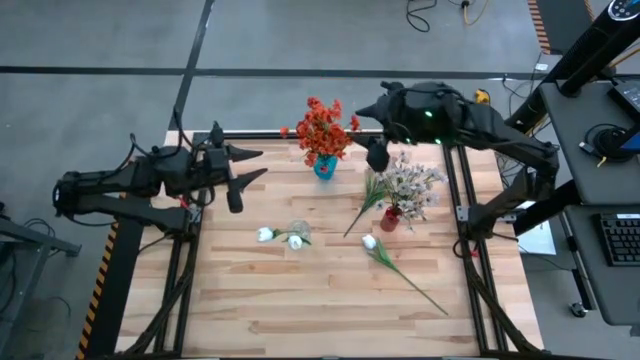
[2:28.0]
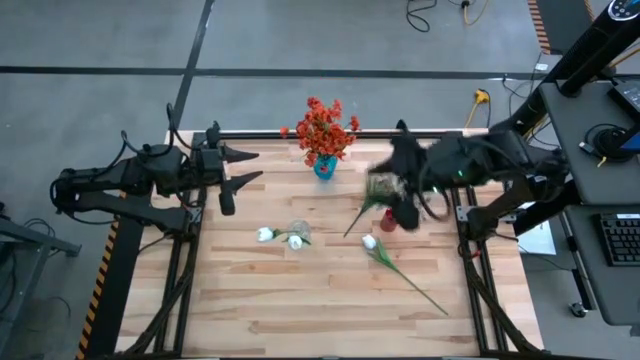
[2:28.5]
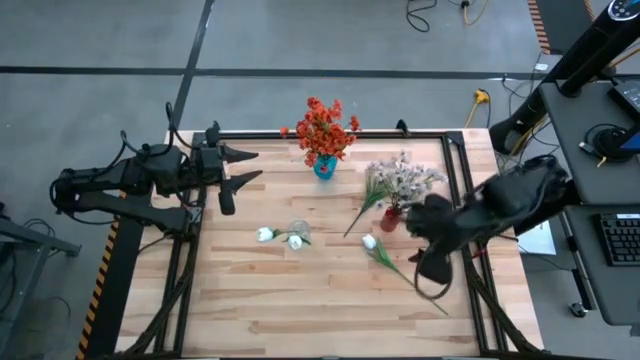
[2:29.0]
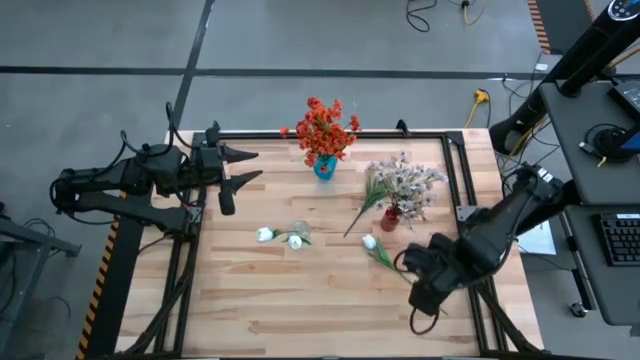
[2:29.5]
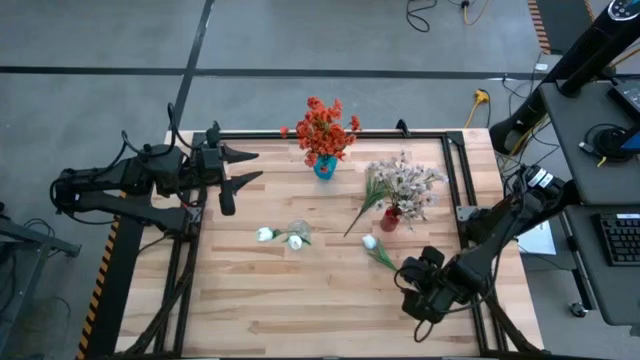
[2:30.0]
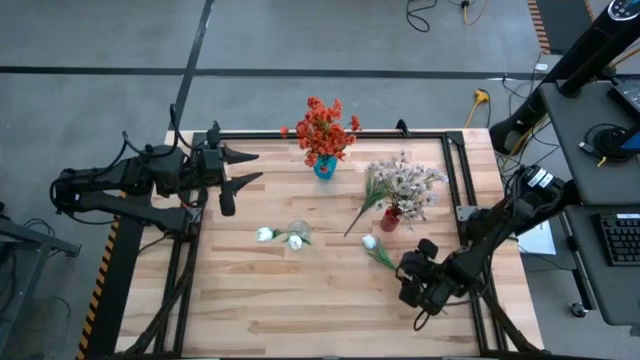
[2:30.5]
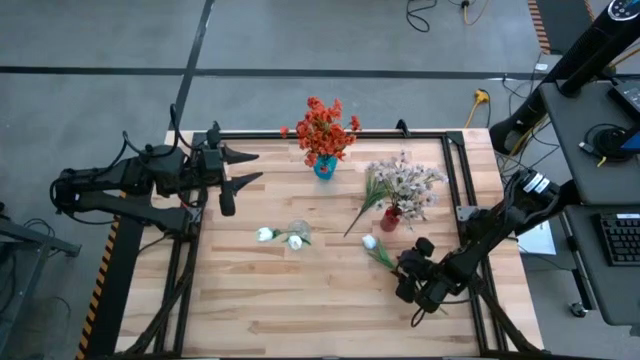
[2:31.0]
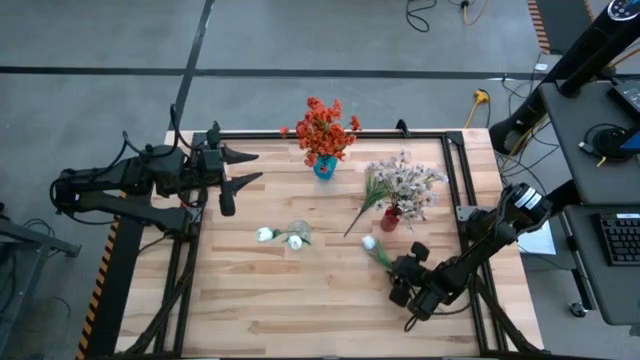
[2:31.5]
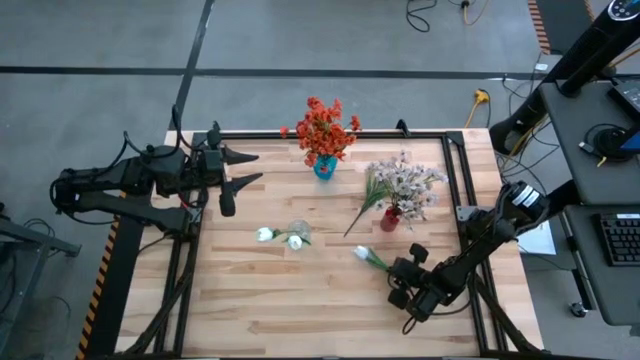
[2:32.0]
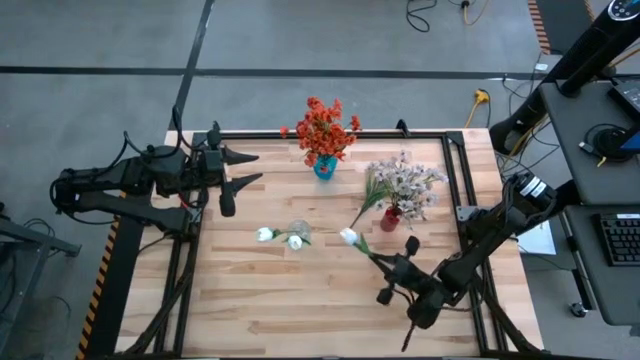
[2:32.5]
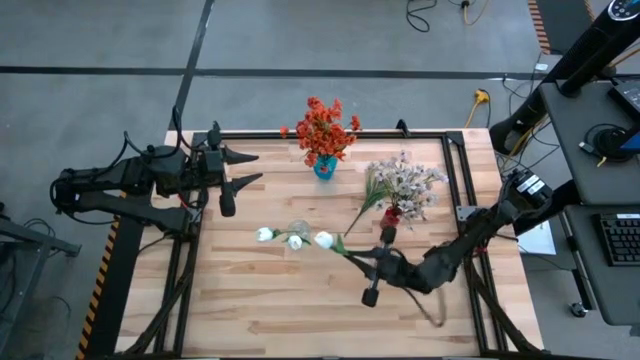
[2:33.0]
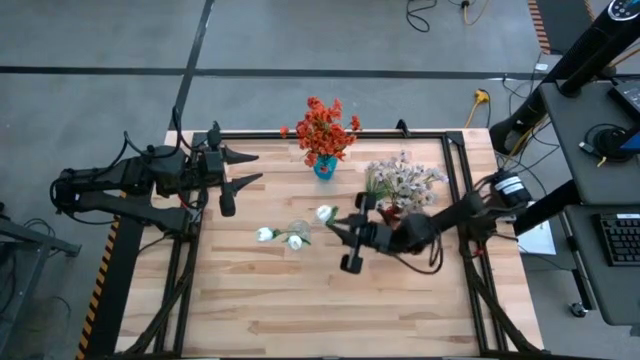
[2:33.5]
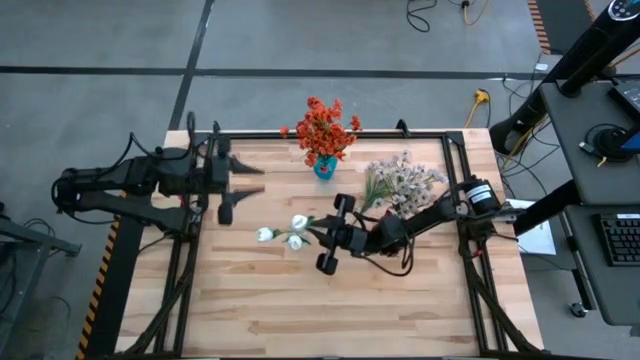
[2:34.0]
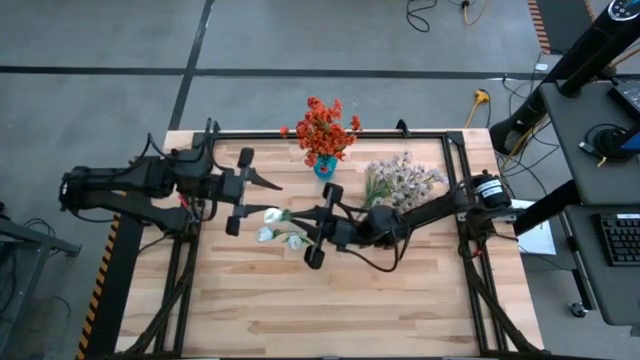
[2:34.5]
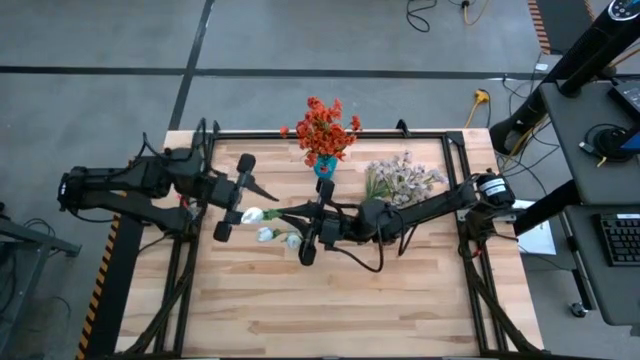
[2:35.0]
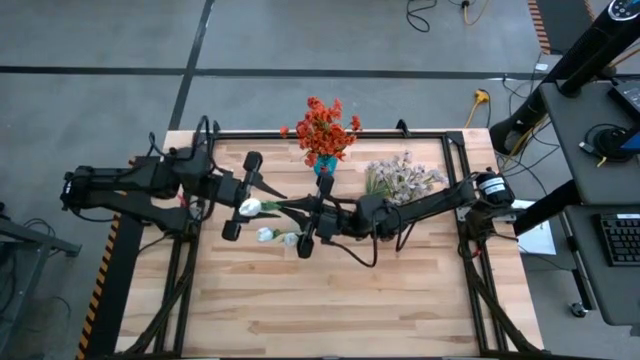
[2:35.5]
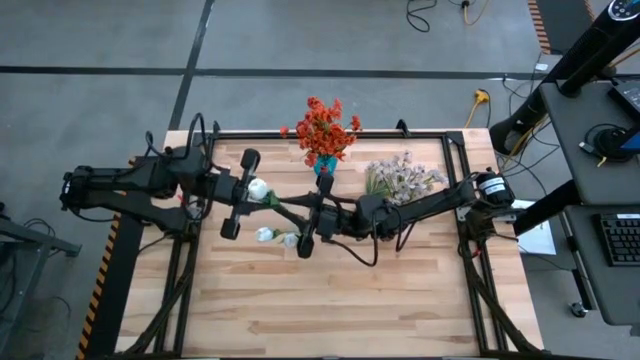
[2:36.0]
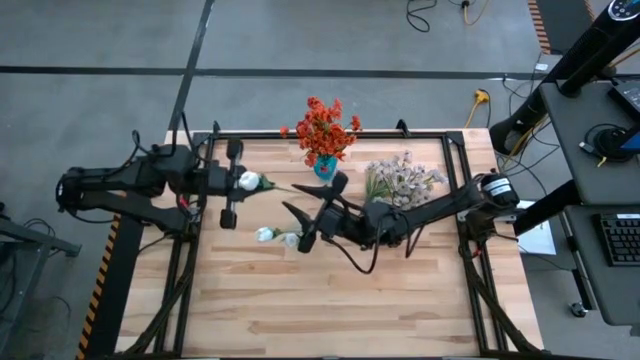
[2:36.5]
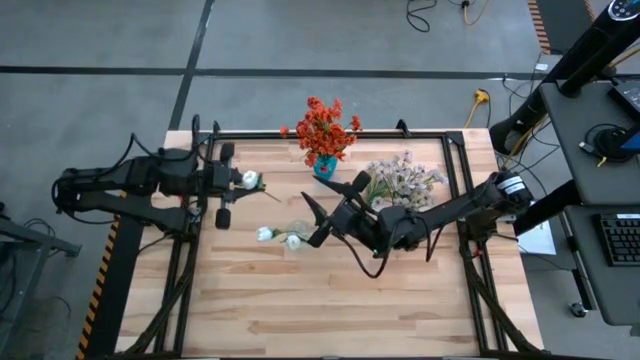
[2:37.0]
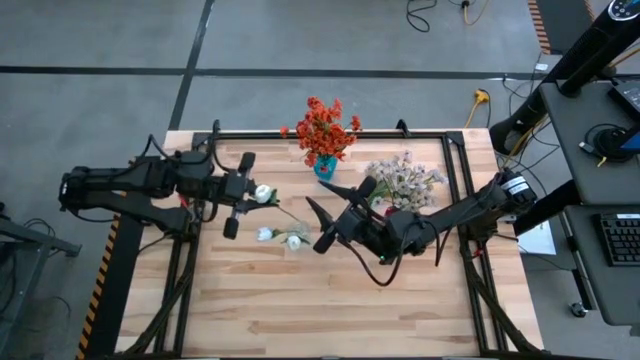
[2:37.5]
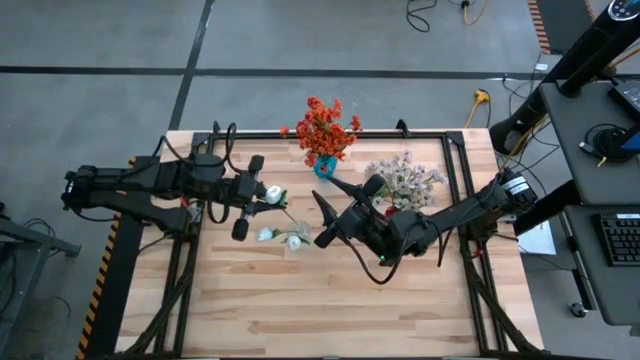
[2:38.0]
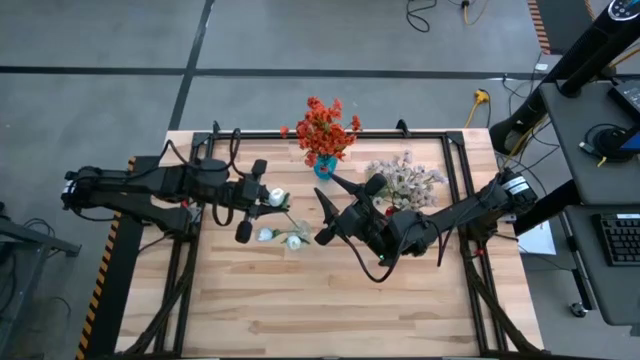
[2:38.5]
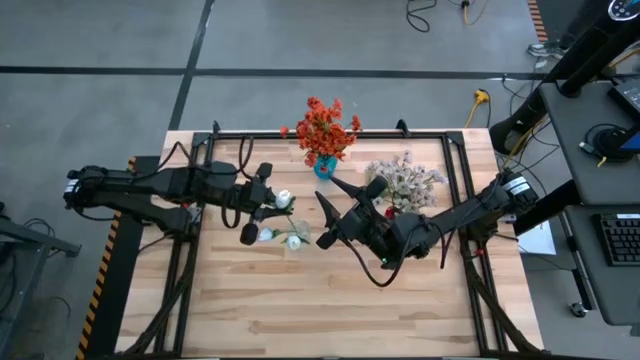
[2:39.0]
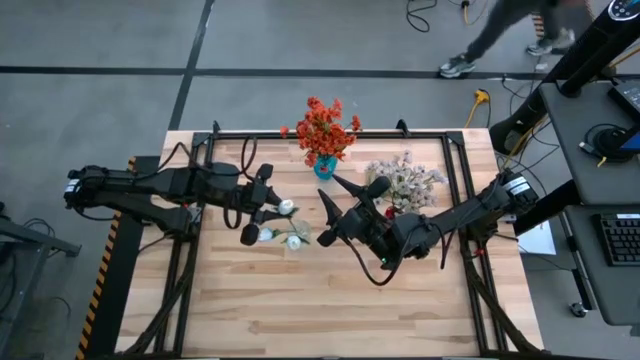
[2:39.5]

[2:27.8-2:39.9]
Task: Sort flowers into vase by color
Put the white flower into the transparent vase

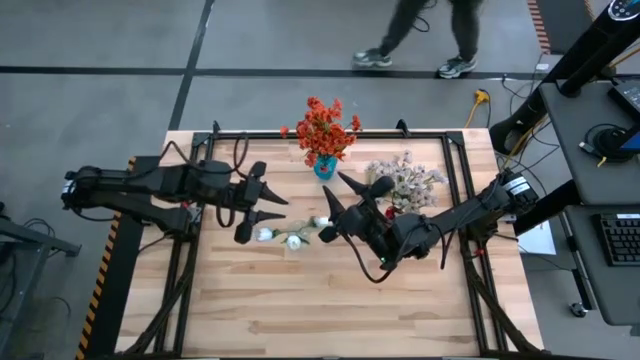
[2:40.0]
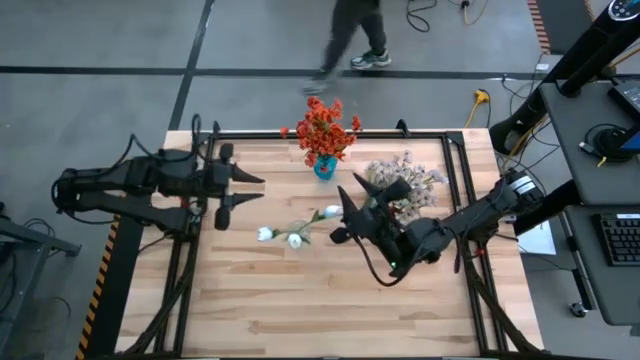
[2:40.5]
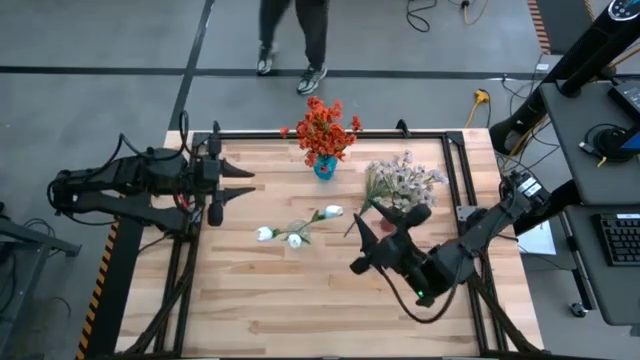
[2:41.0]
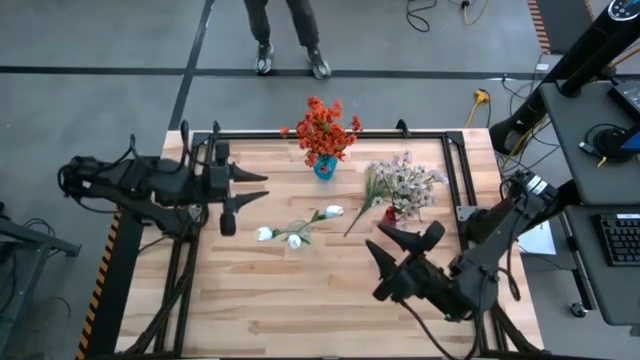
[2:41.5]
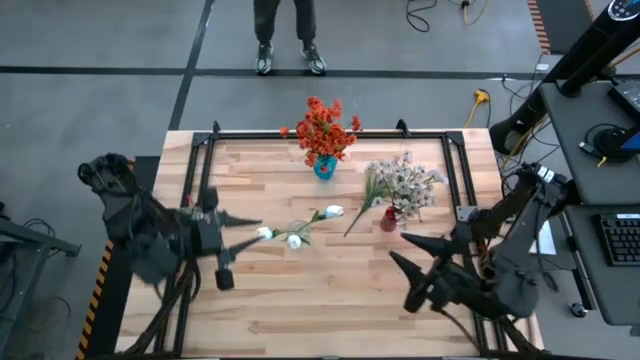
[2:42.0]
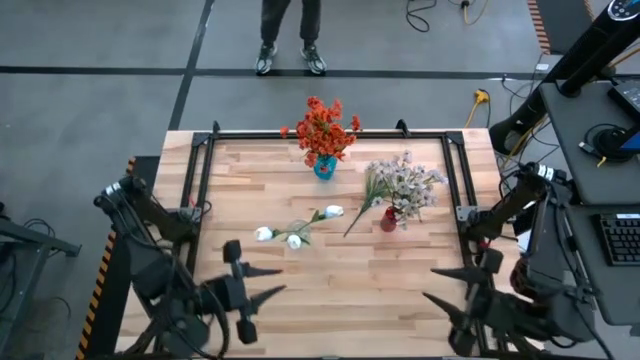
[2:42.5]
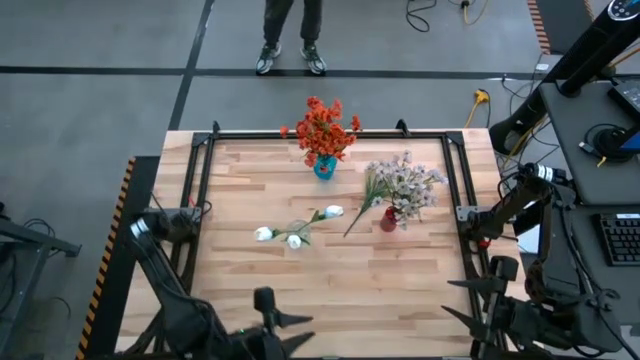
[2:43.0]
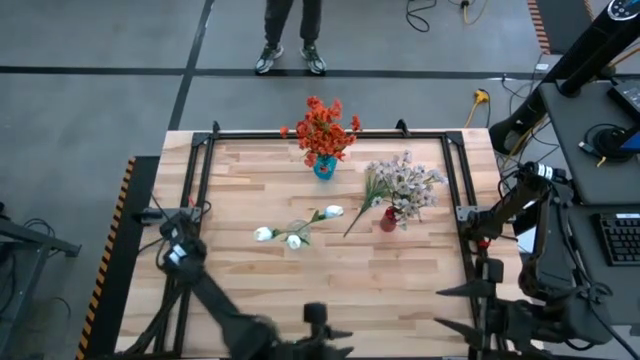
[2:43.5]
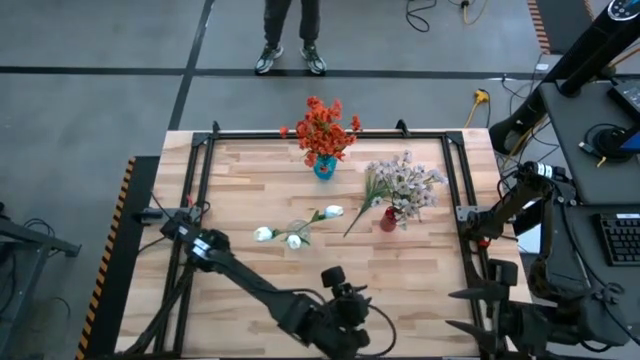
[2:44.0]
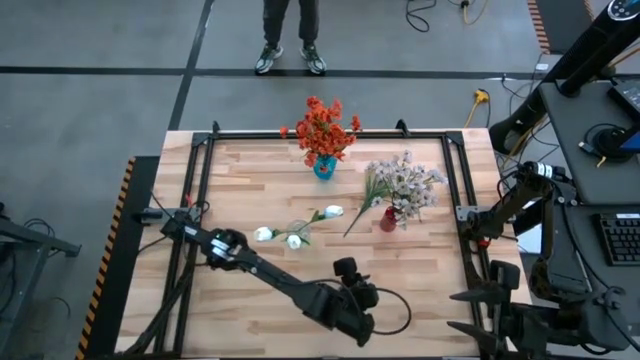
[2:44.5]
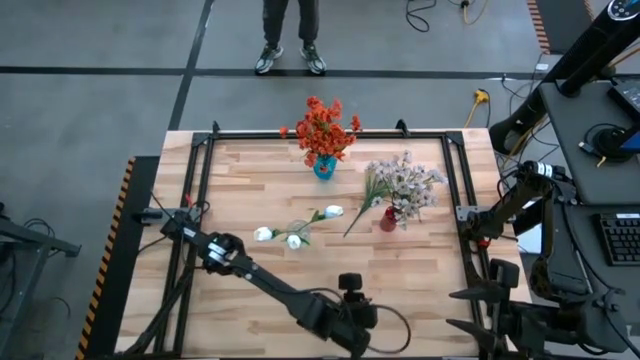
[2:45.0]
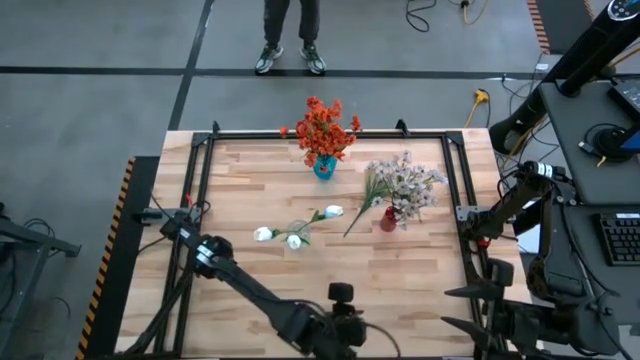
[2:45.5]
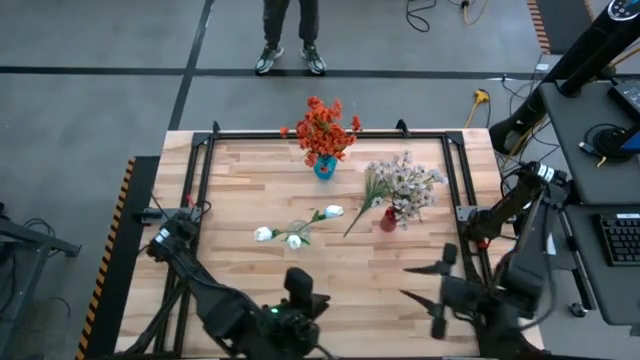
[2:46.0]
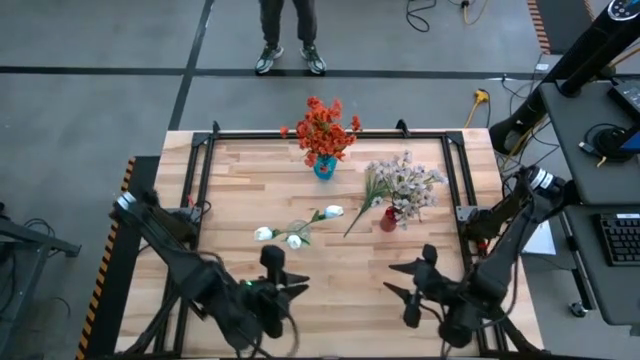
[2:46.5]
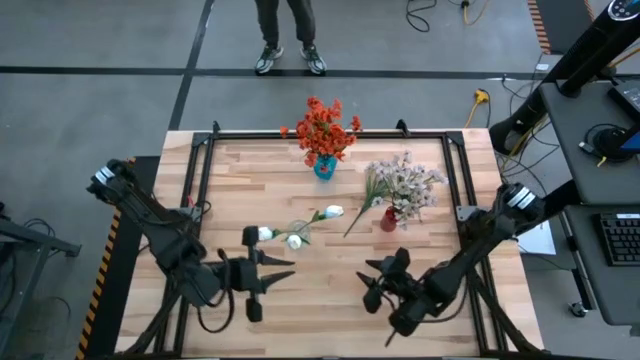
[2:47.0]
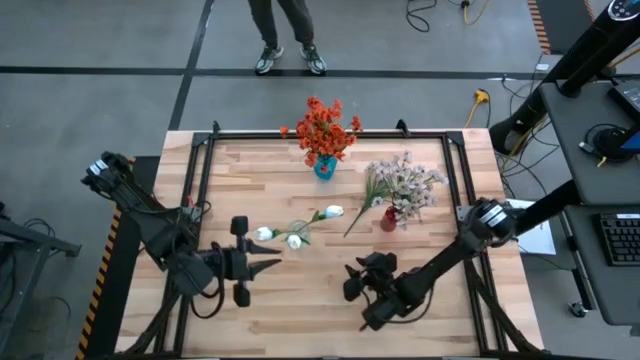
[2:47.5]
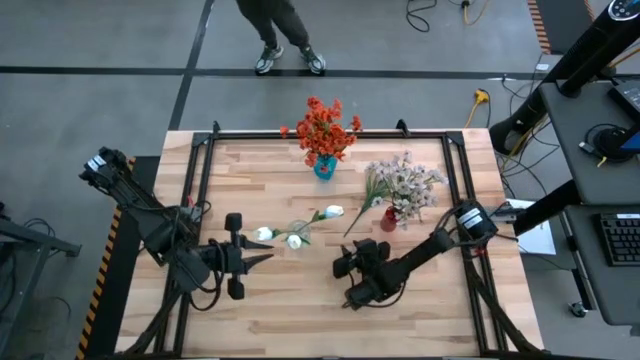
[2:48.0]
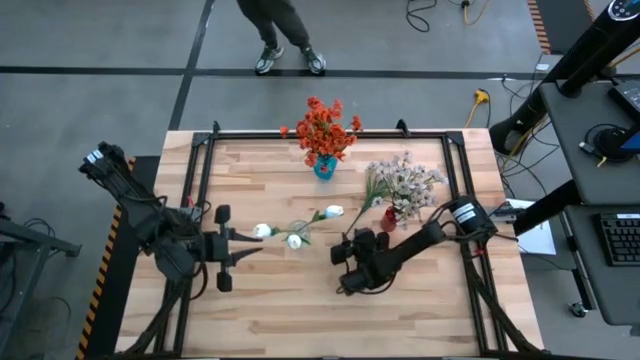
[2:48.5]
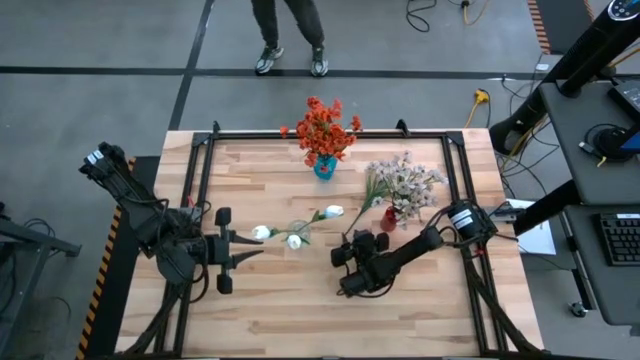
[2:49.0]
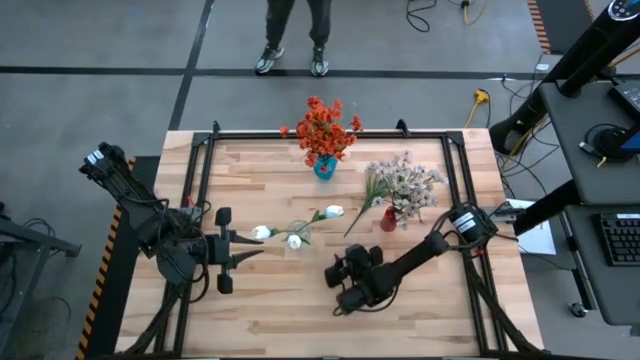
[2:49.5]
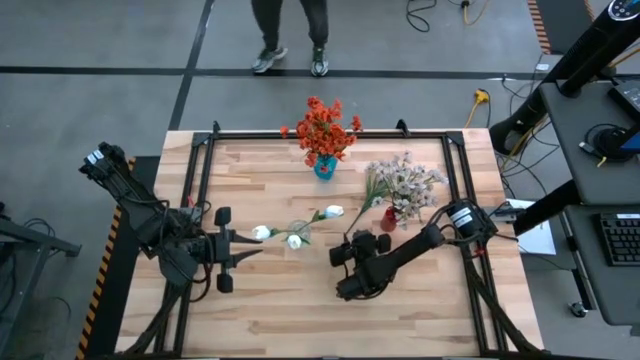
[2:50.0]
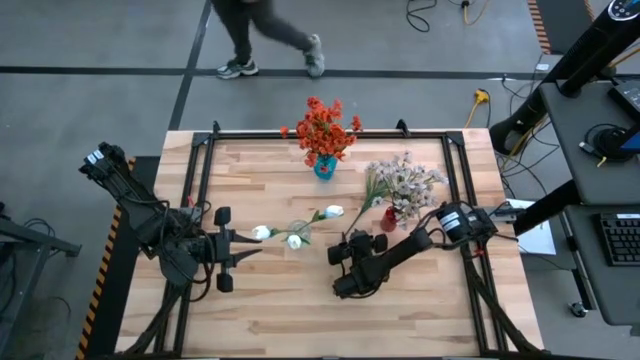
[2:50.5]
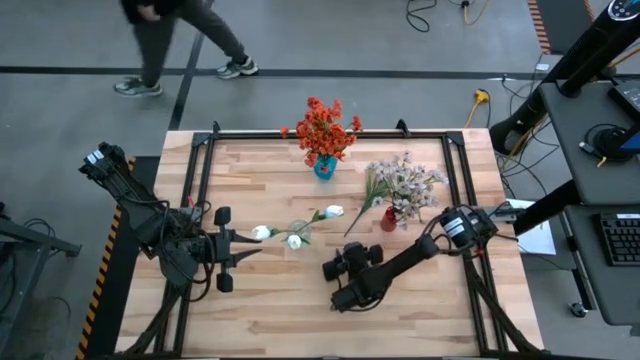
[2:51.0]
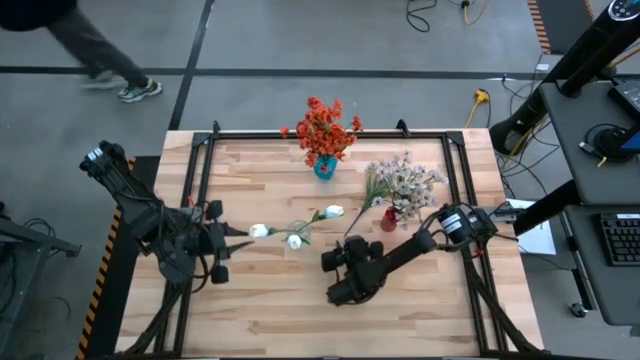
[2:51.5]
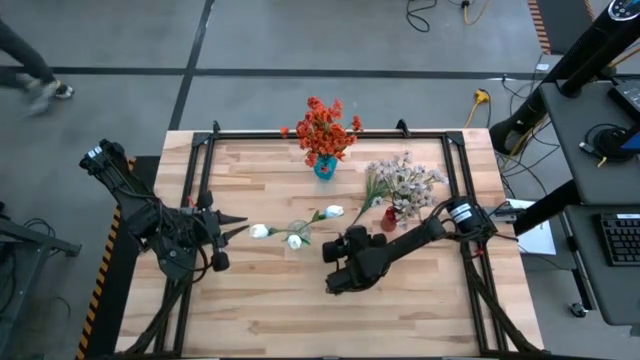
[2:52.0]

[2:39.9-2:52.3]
Put the white flowers into the red vase
